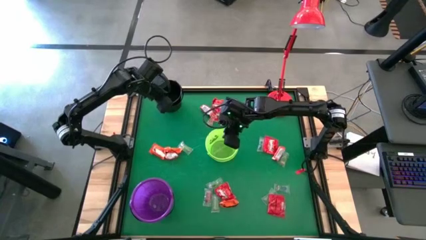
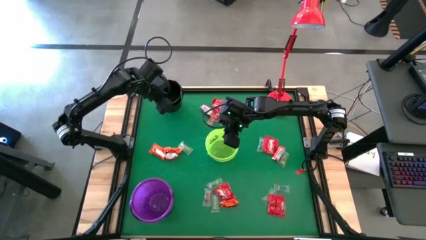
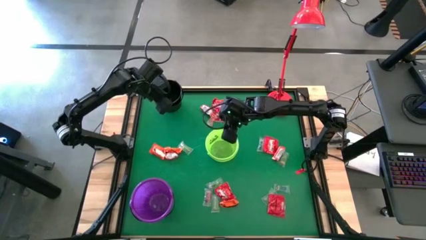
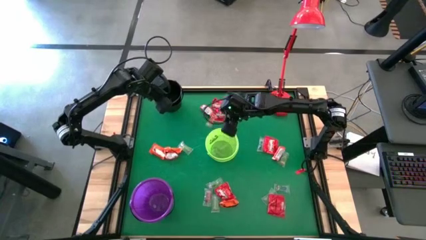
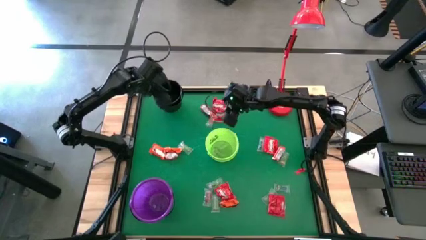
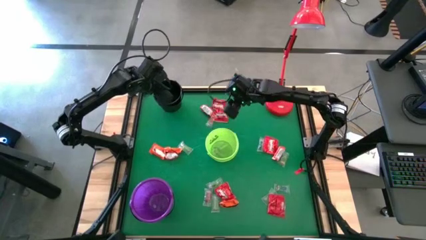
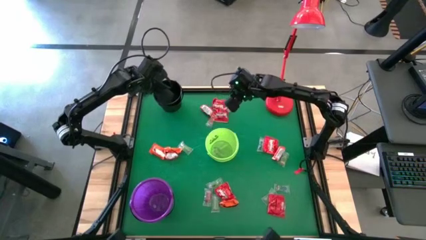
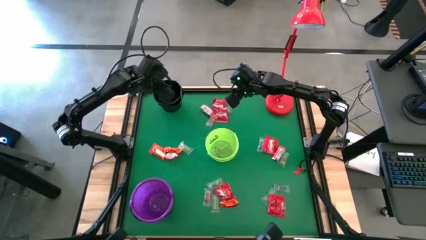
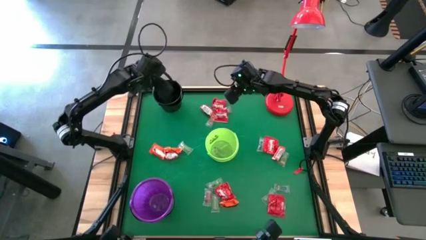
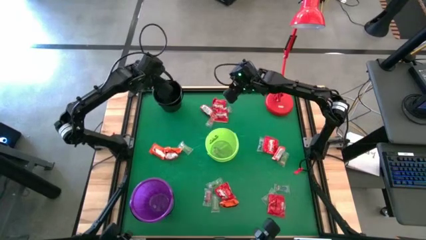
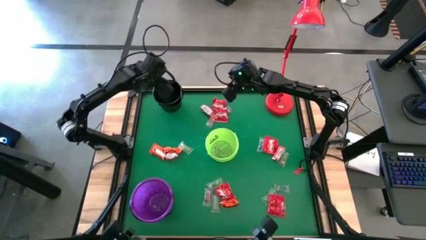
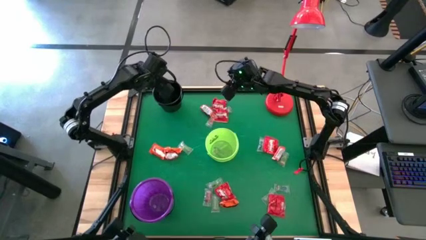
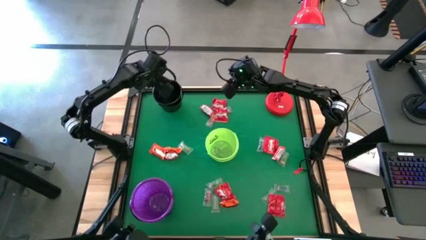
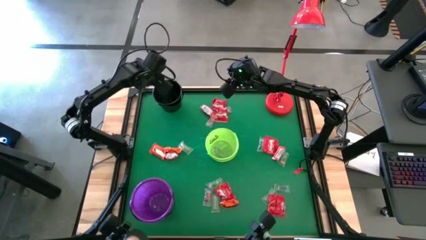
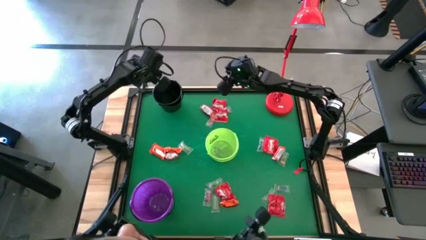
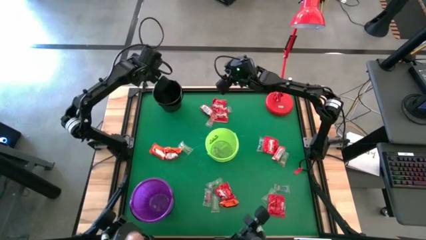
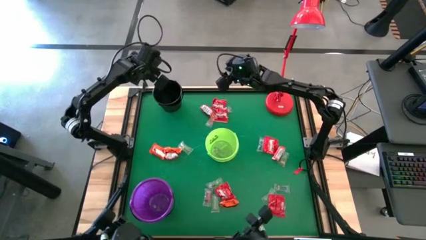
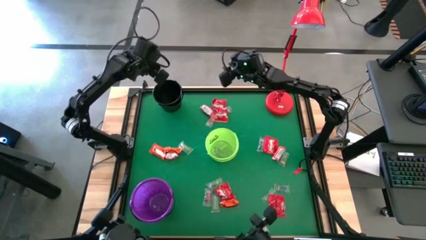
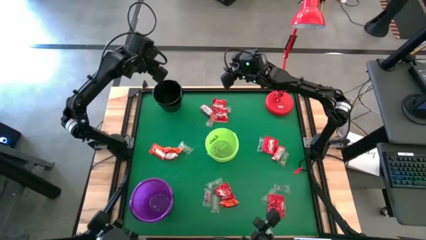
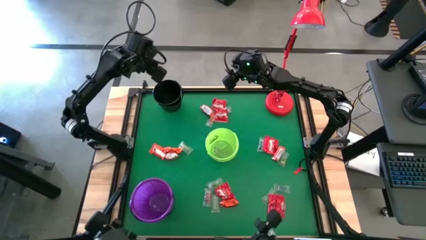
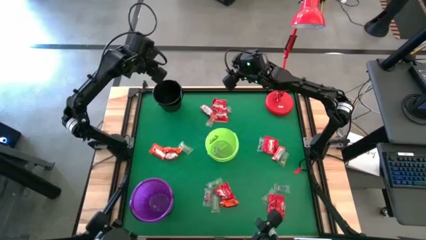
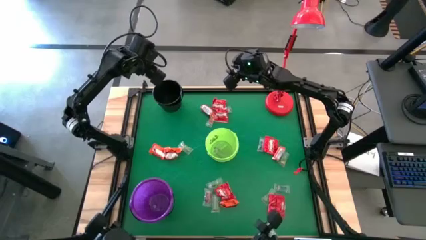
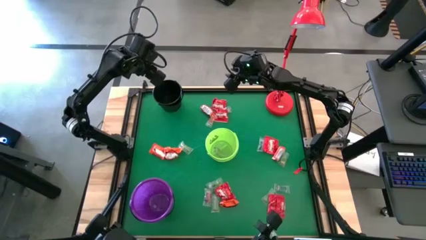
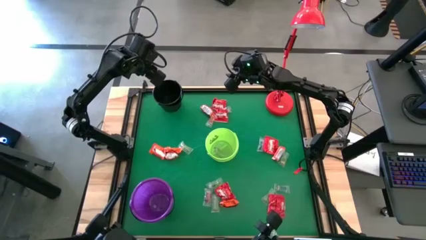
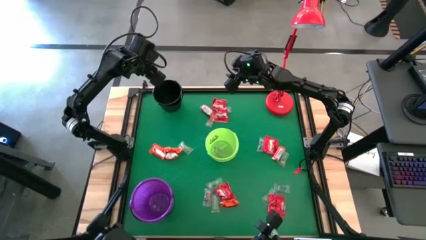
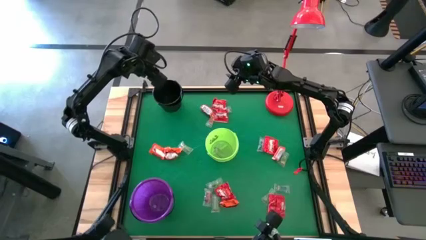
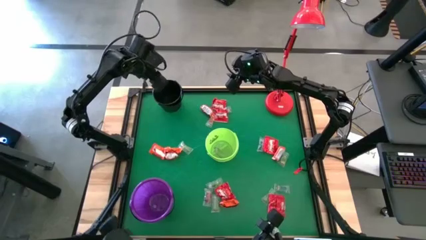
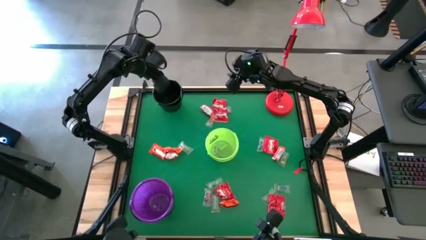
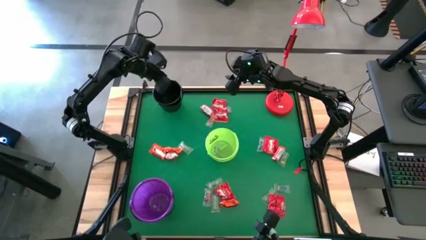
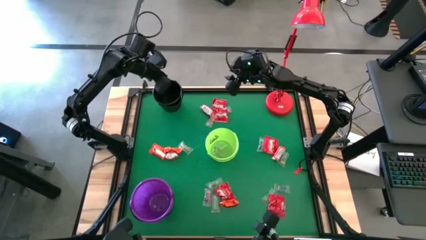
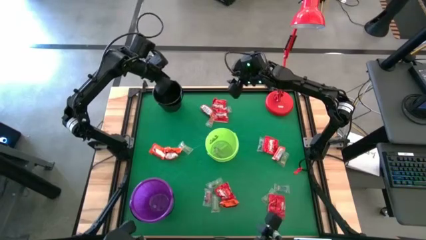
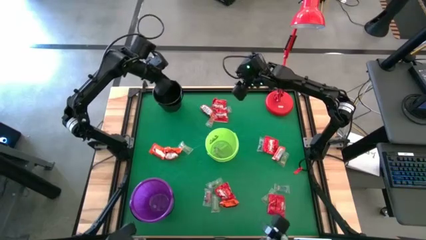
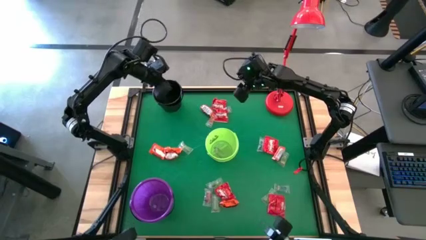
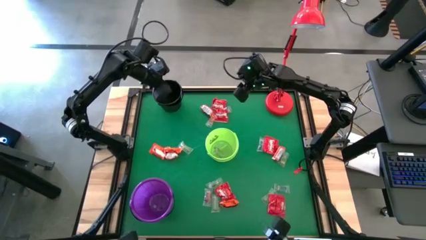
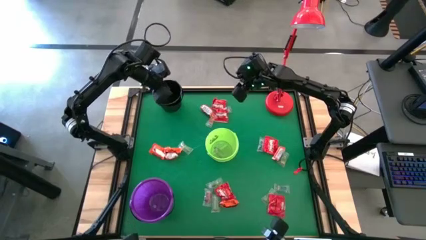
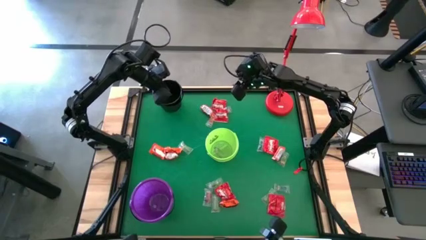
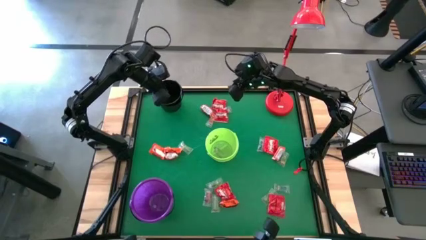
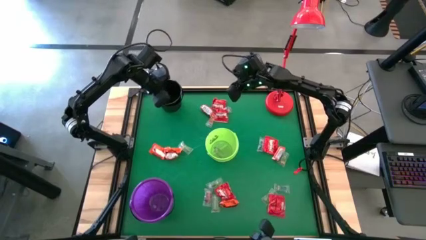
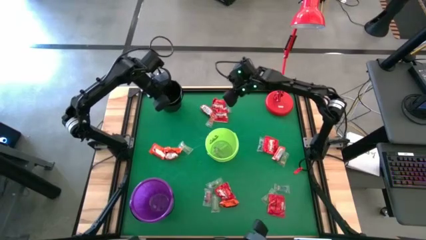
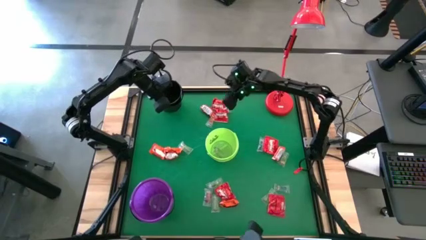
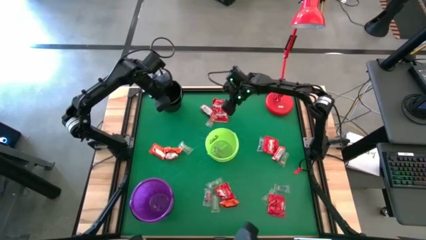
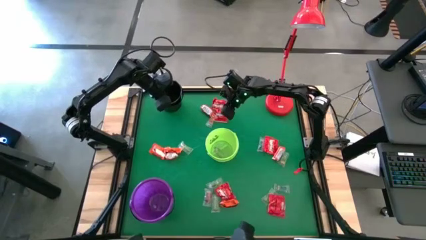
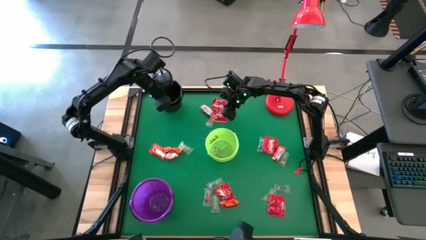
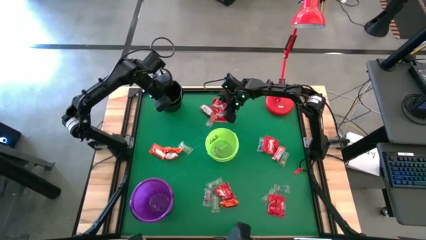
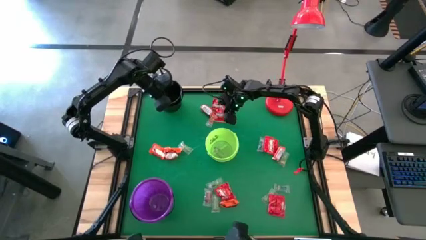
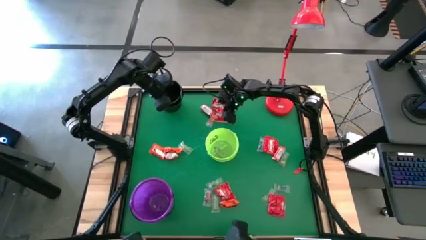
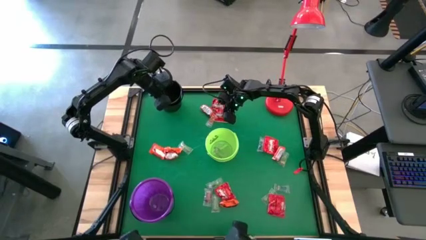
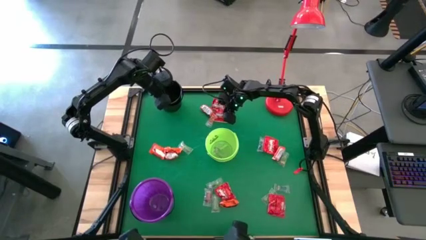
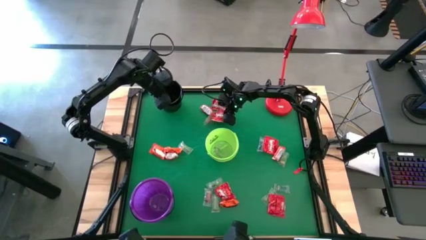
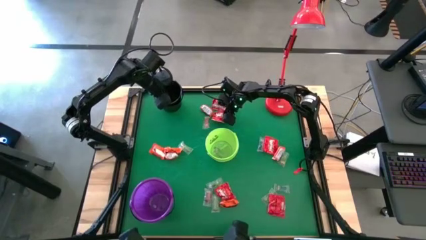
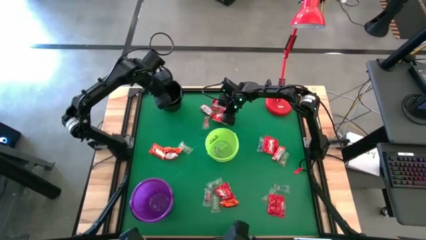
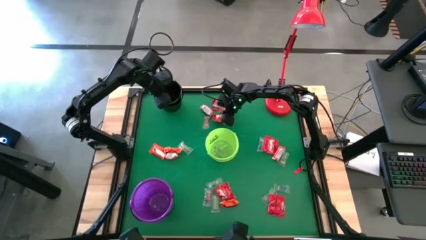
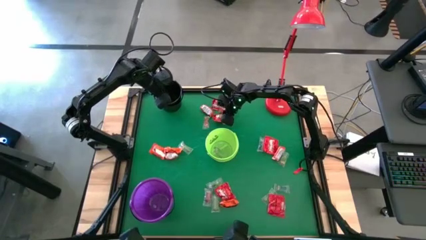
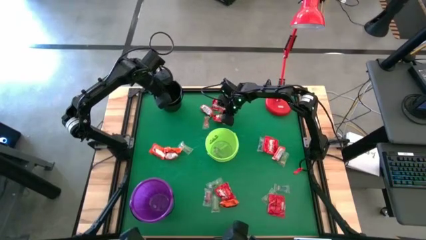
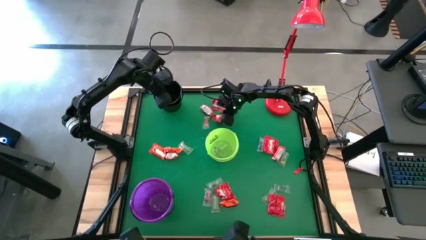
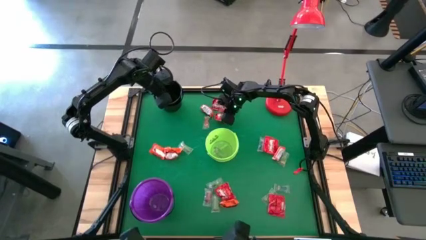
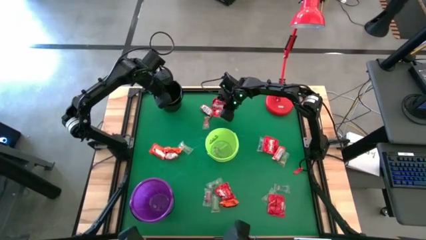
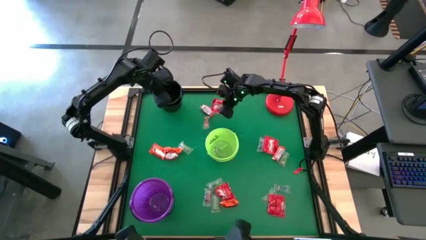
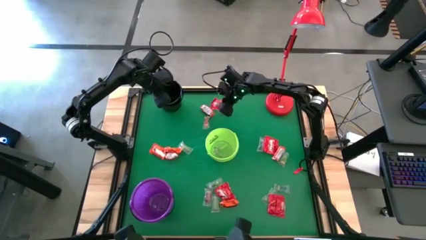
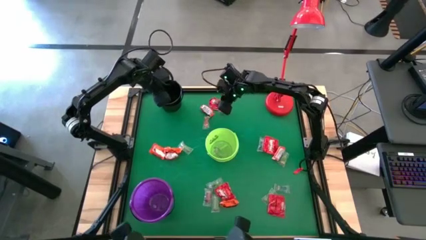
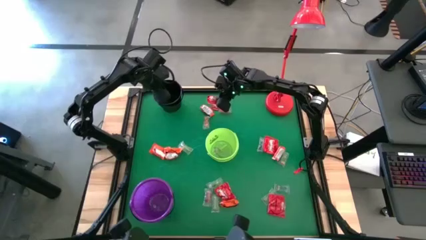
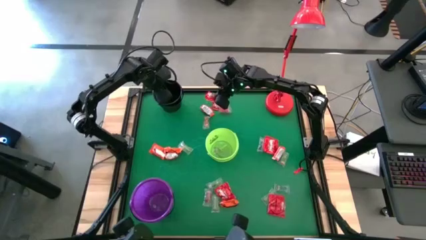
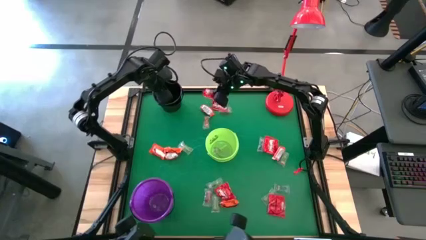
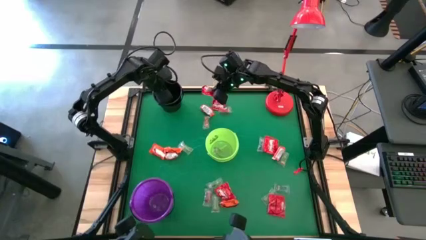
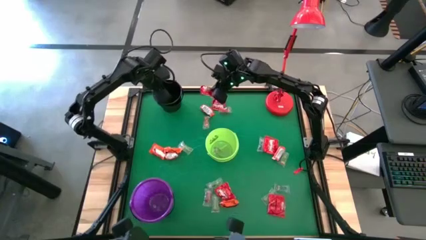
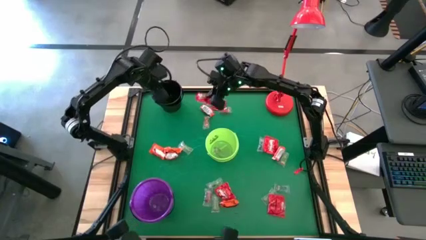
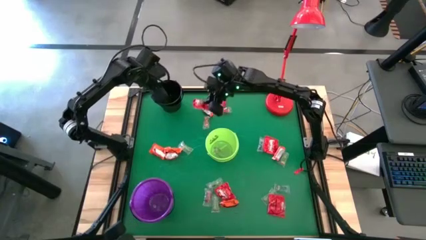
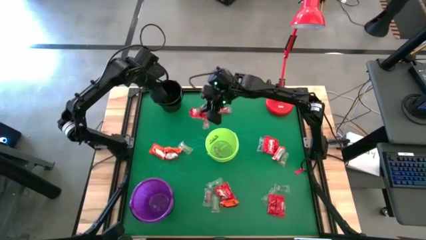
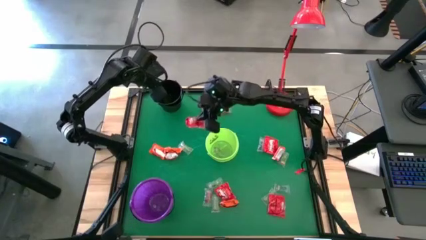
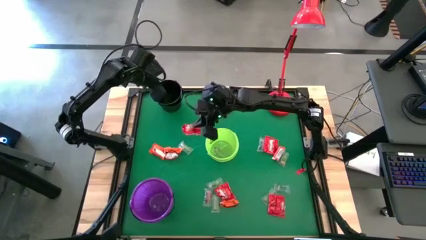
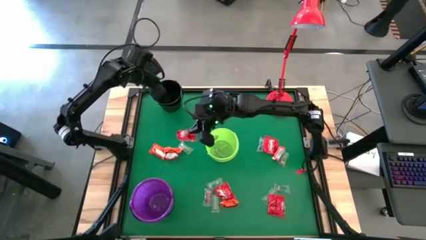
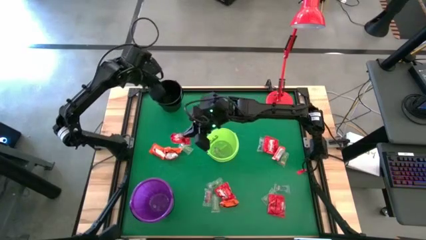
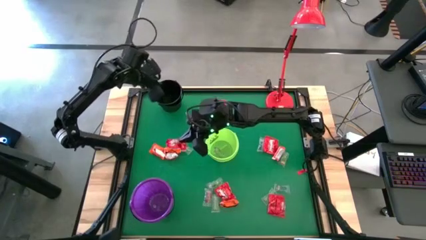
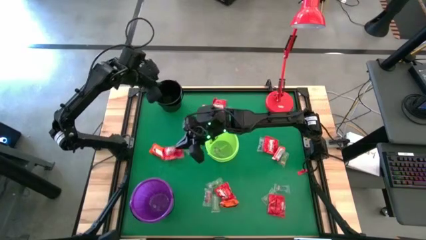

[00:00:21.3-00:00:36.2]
Task: Sort candy
Put the red candy into the violet bucket

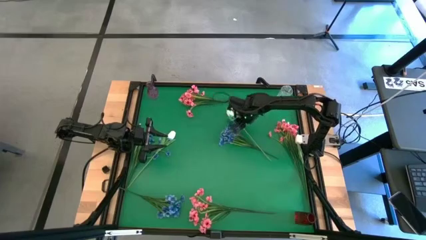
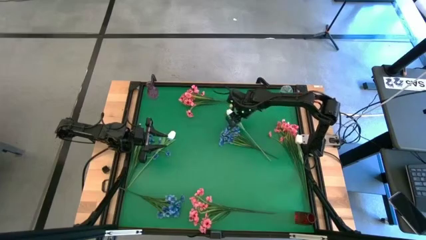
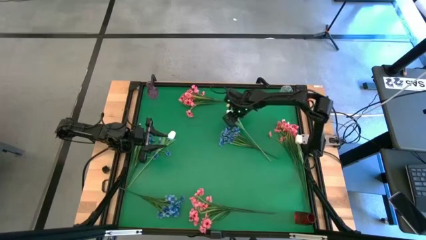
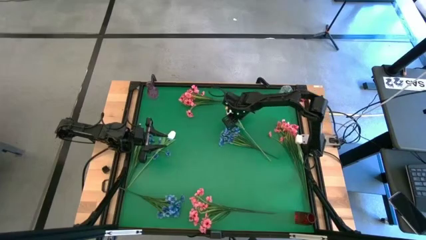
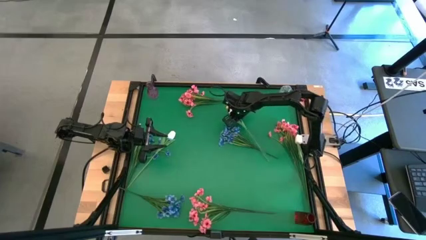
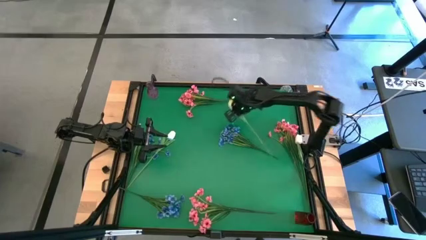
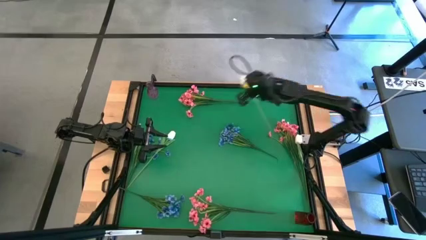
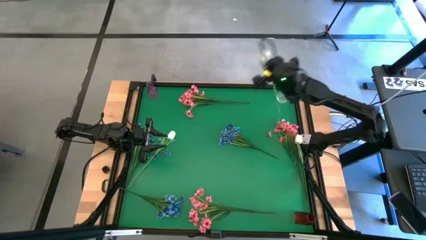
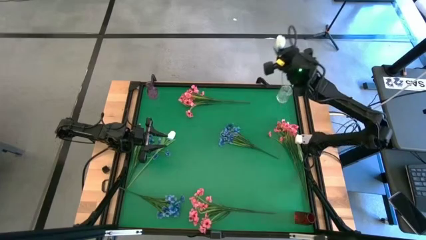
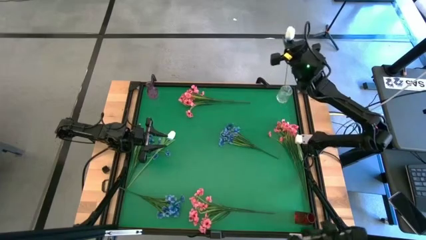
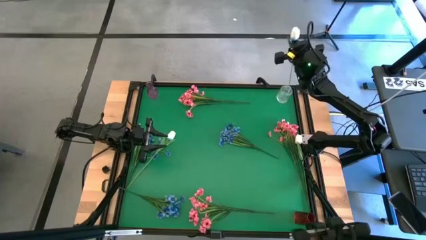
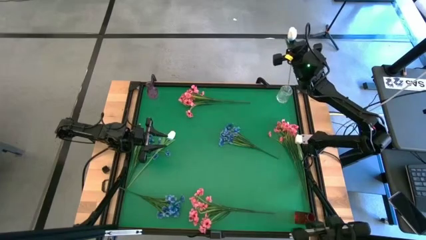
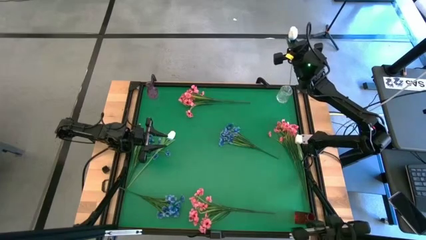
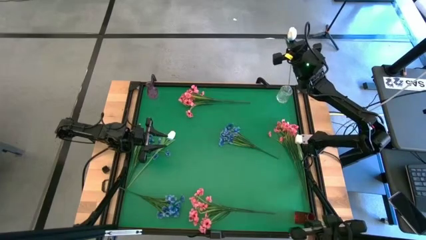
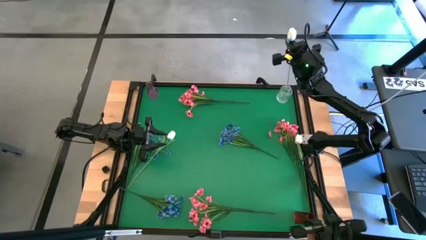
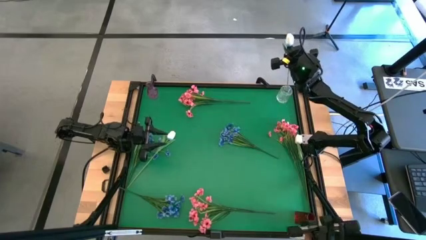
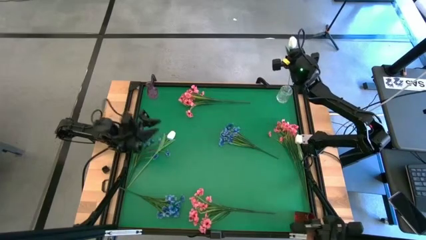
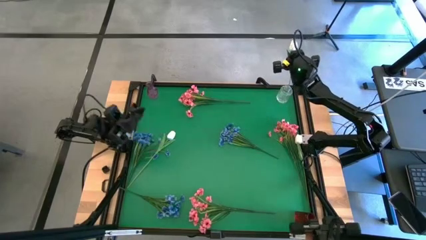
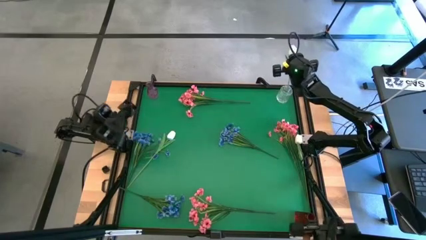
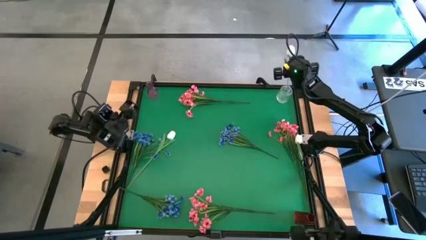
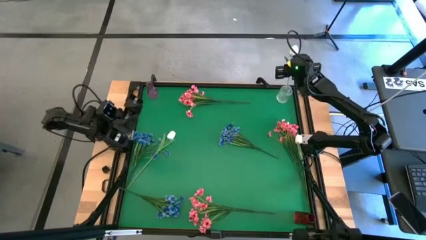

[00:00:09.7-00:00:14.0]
Task: Sort flowers into vase by color
Put the top white flower into the transparent vase
